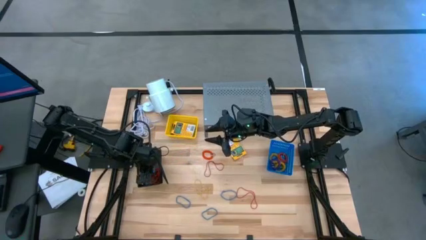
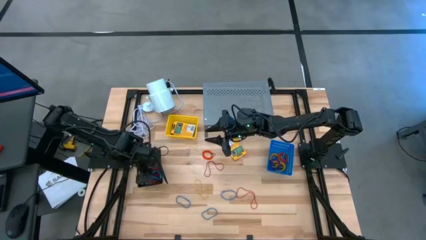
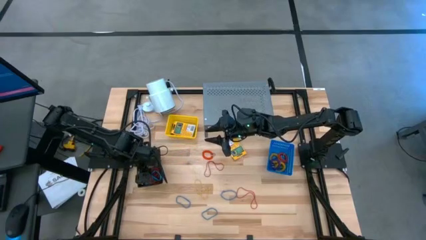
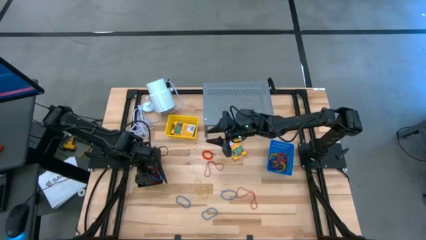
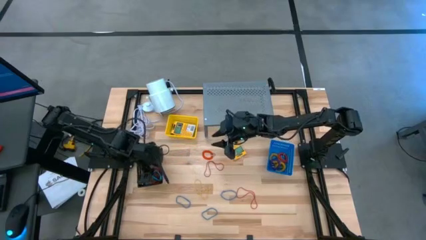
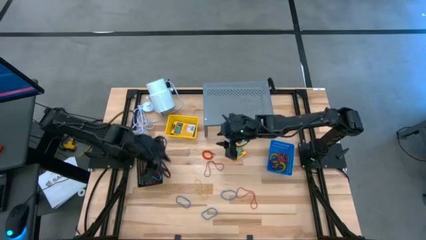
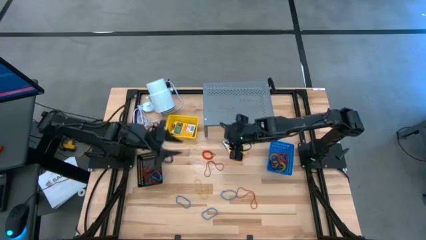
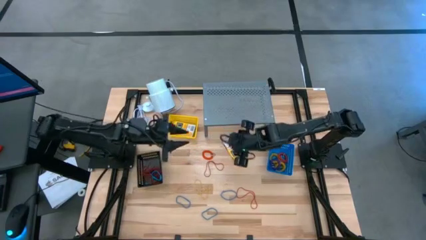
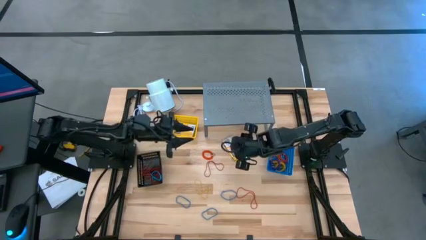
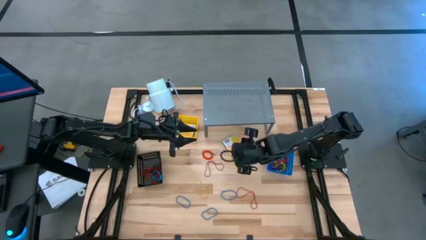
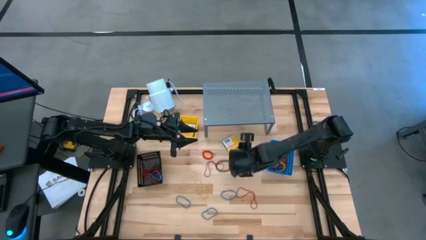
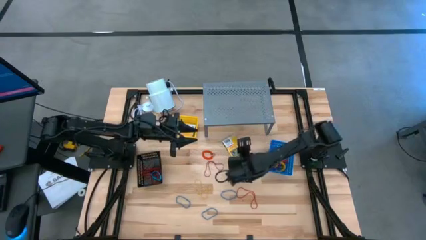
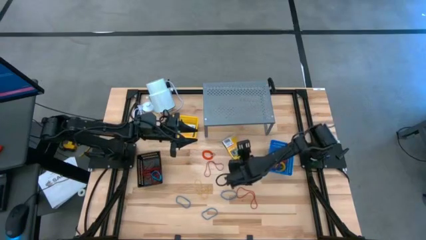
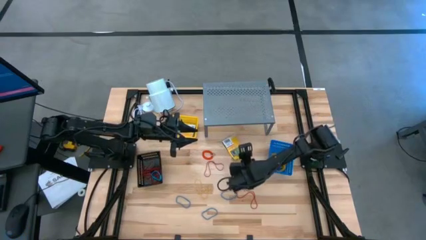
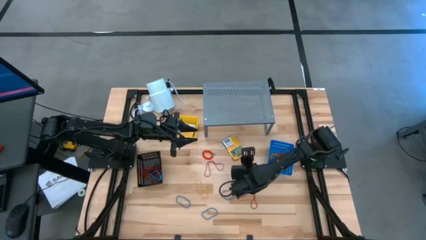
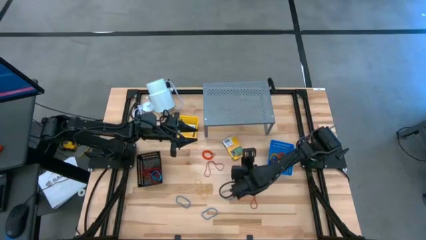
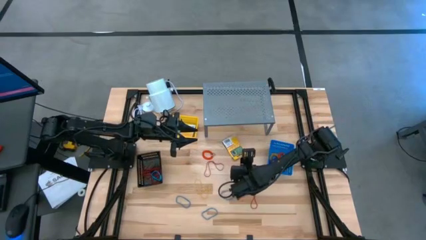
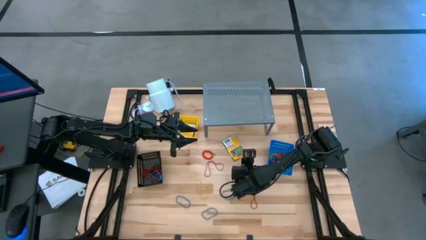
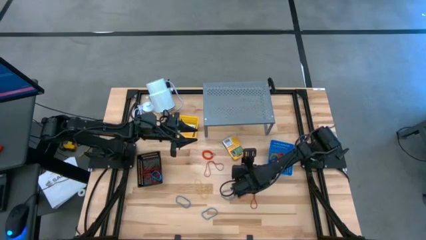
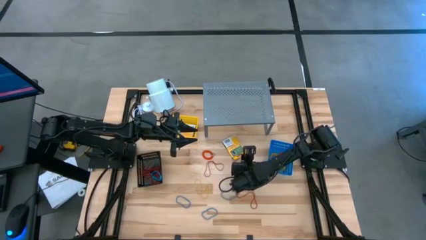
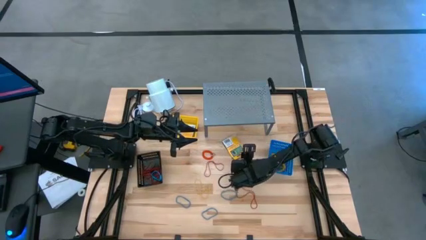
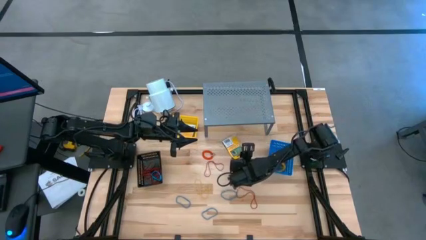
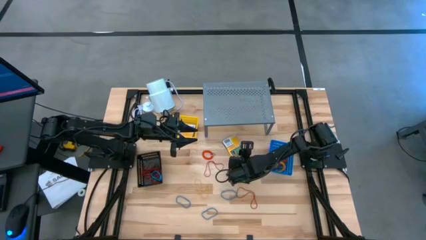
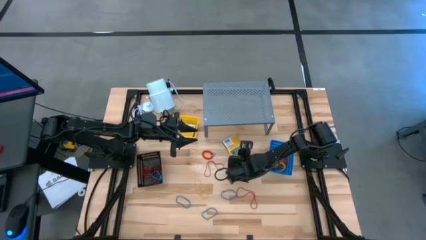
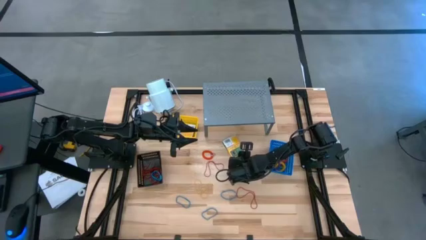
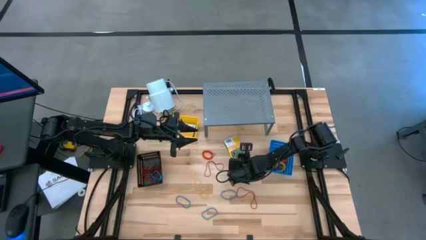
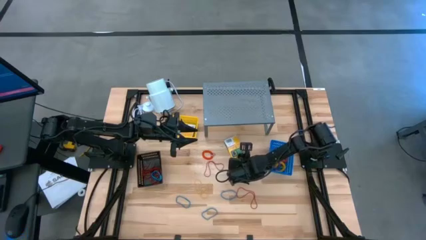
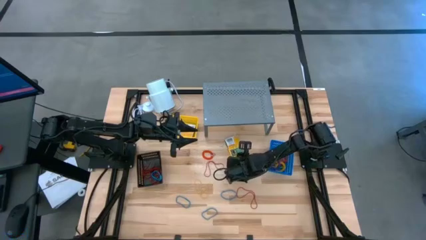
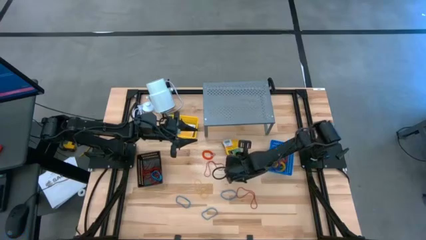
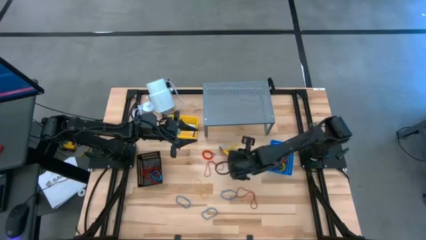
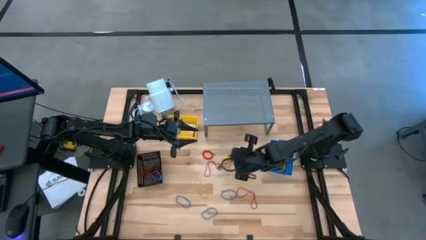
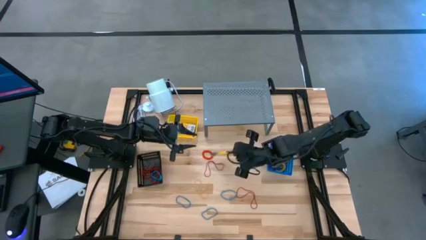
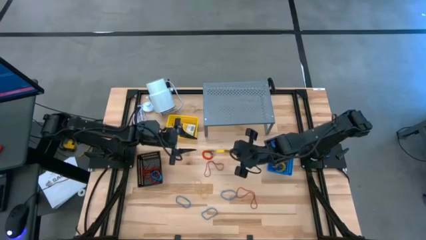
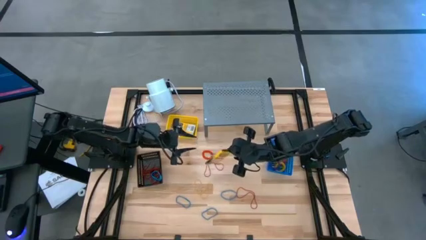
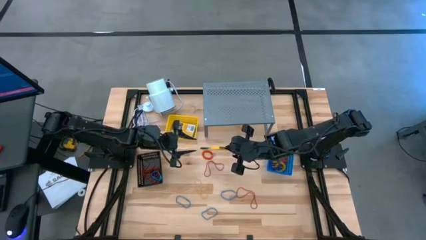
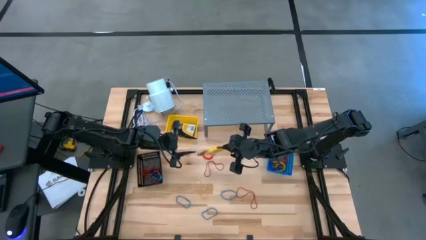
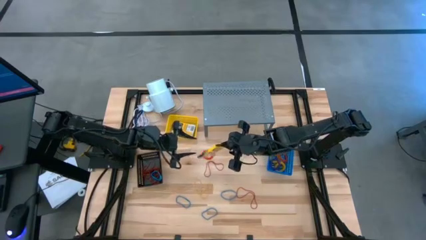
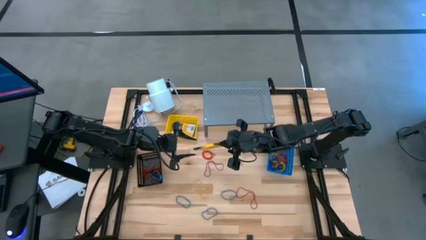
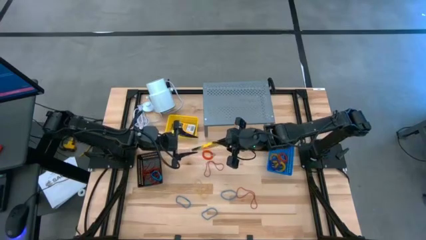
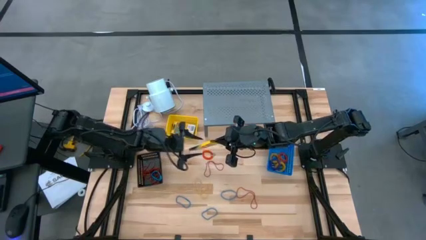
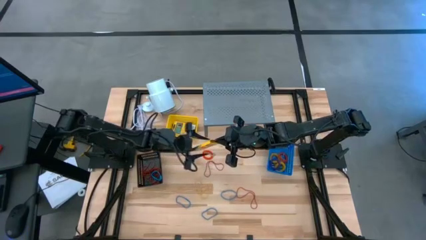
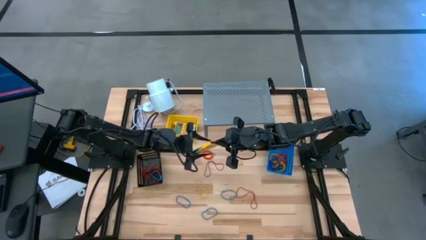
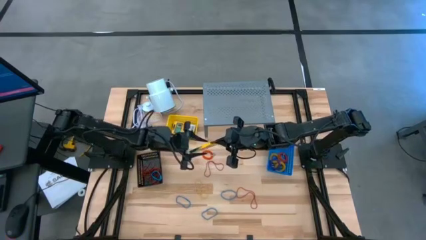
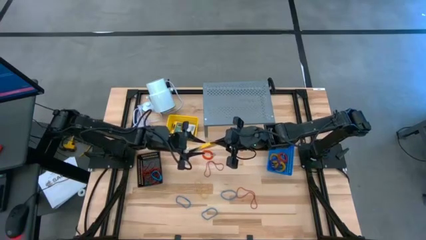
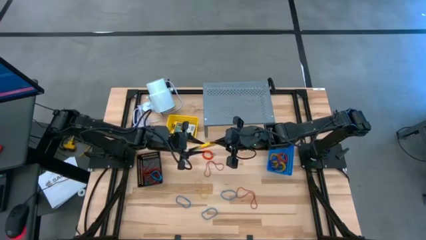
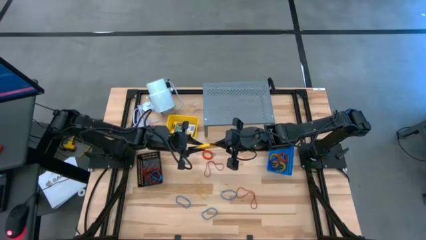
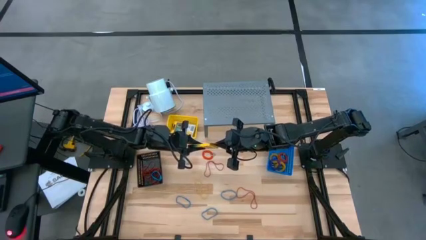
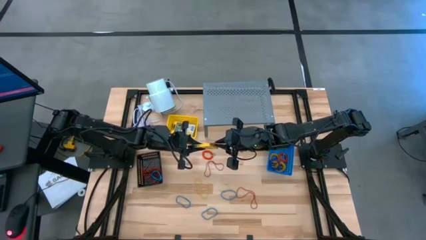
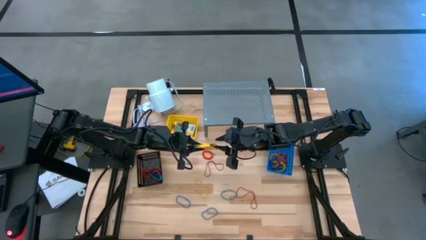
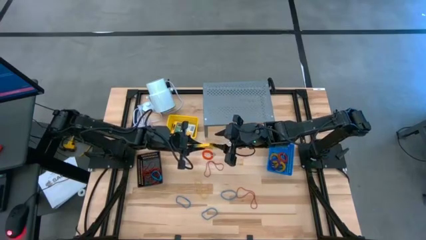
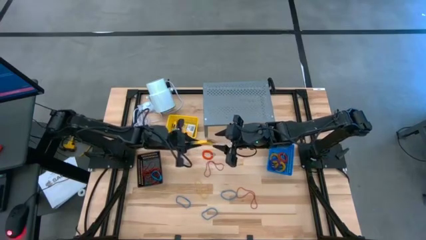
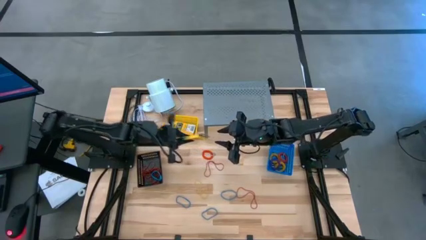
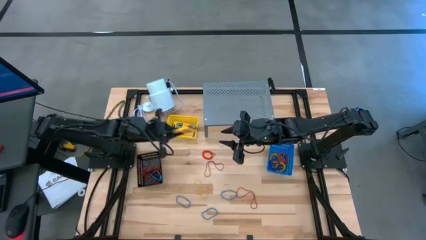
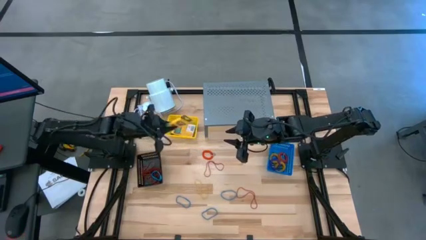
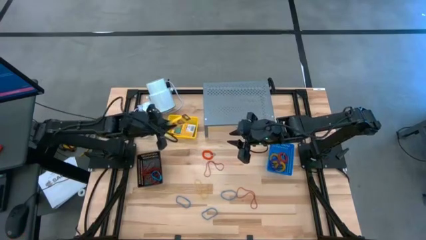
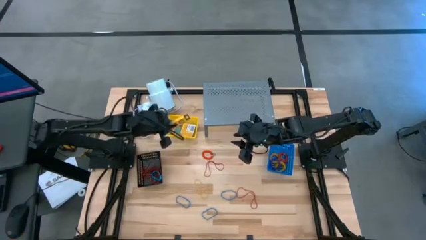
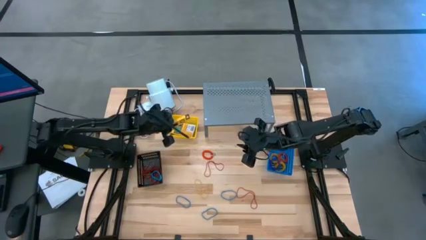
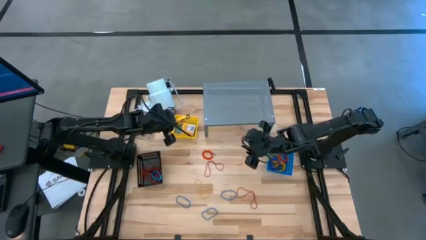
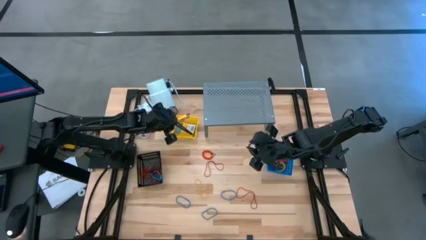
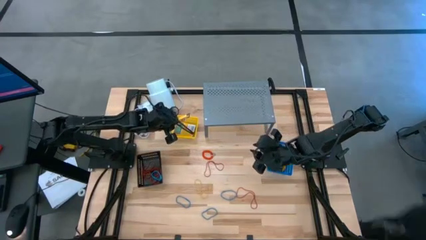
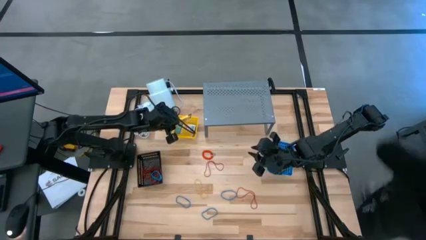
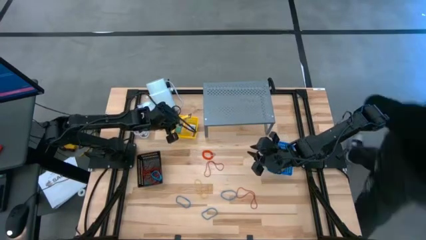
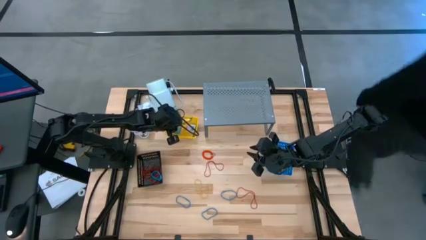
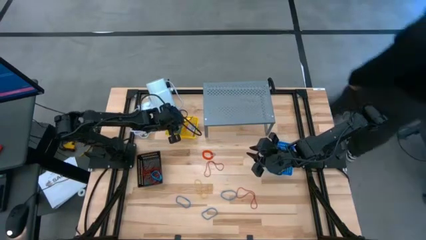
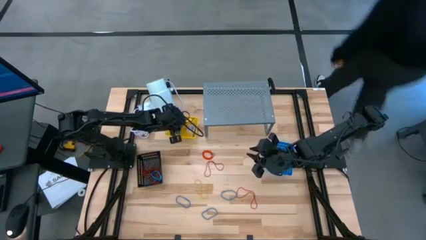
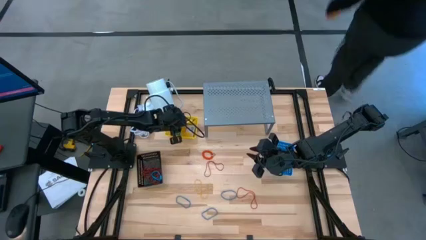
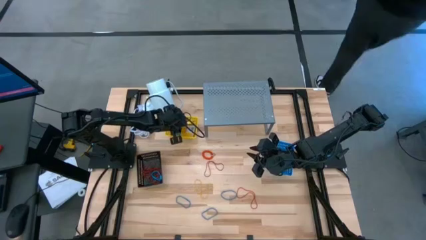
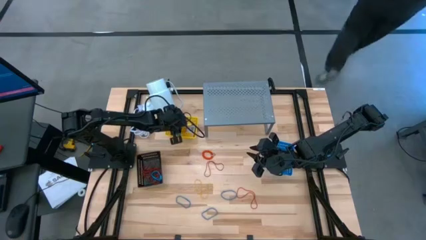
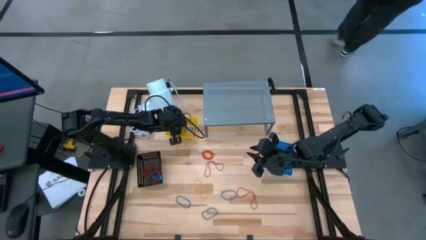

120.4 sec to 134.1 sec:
Task: Pick & Place Office Desk Supplies
Put the crayon box into the yellow bin

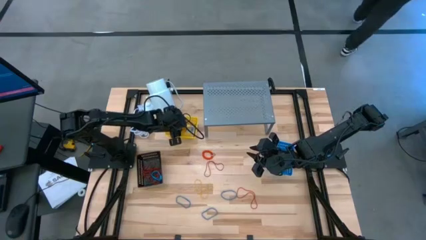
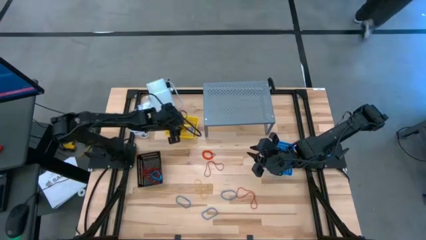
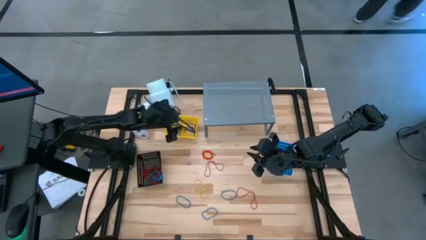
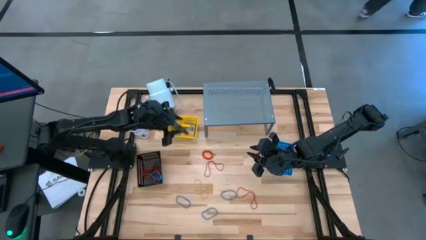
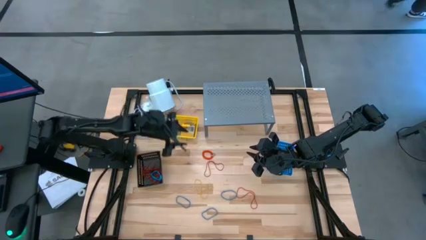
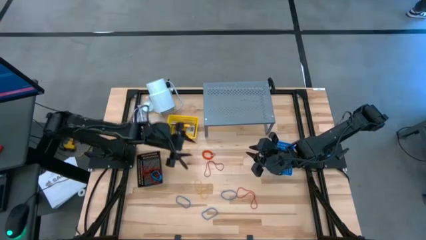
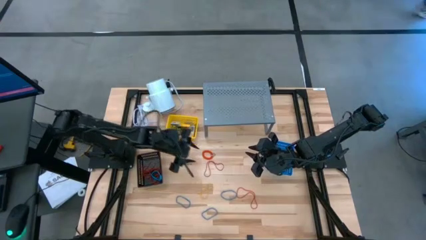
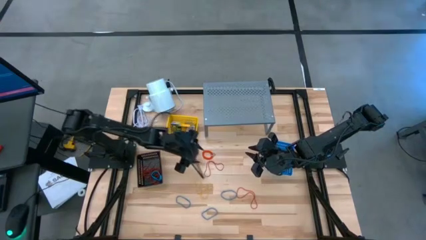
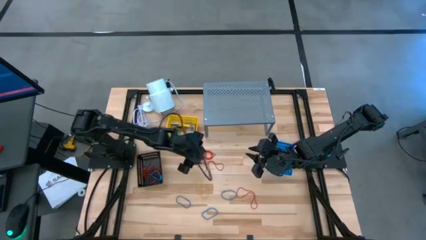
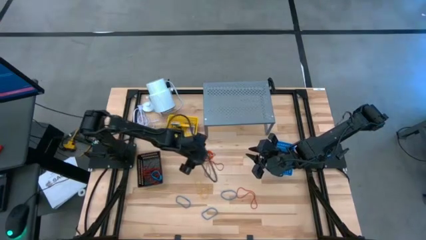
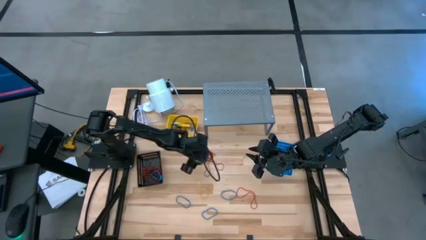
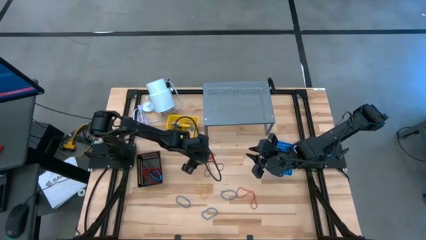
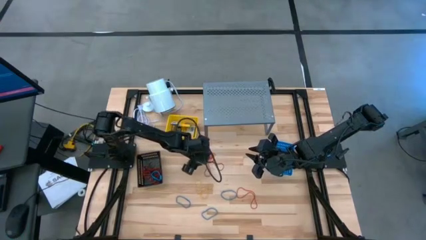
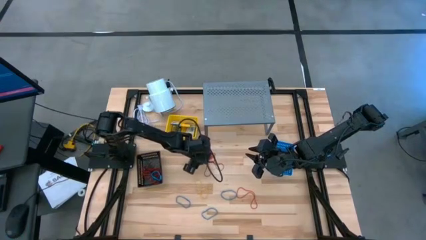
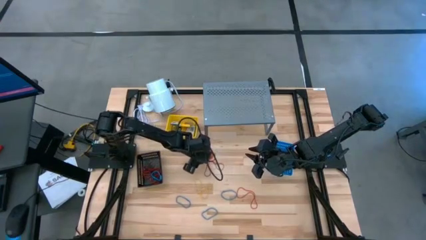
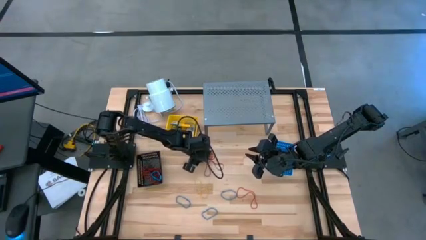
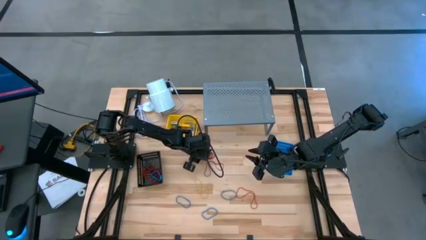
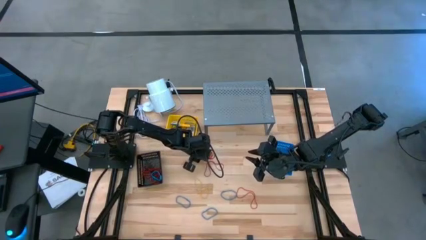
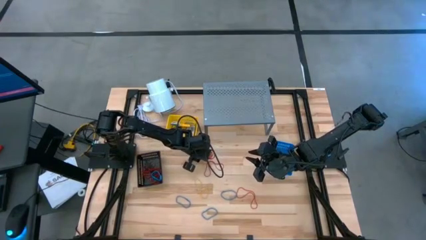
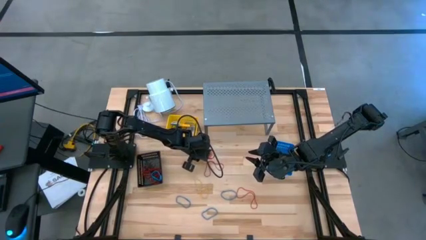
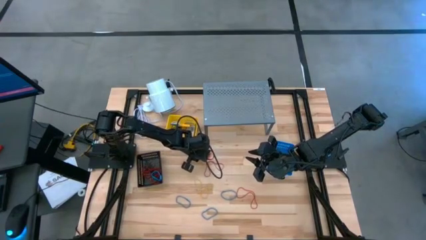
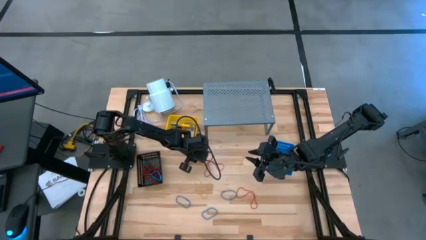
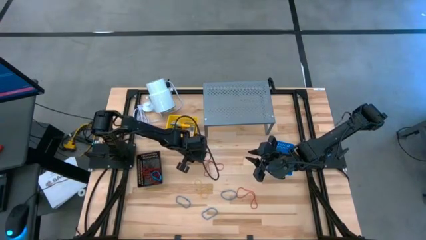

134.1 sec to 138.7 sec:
Put the orange spring keychain into the blue bin
